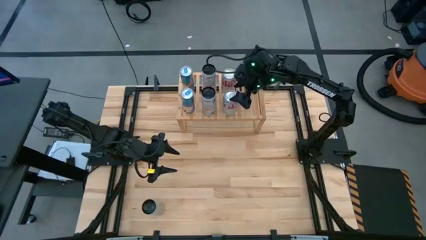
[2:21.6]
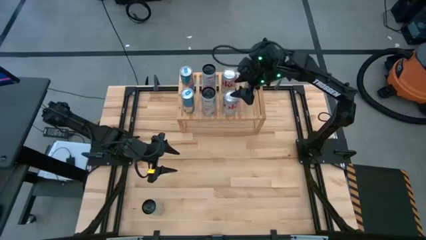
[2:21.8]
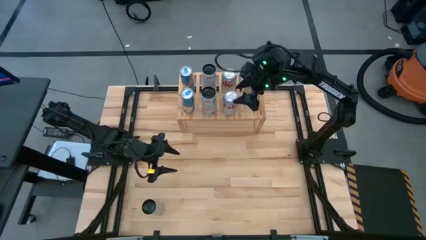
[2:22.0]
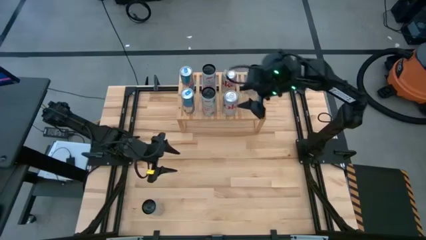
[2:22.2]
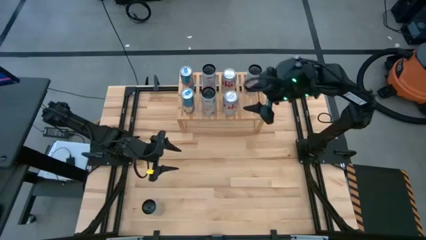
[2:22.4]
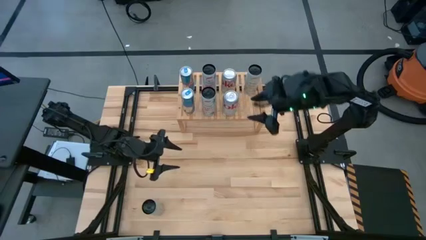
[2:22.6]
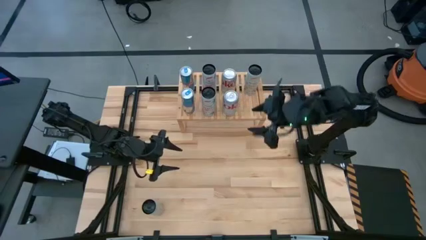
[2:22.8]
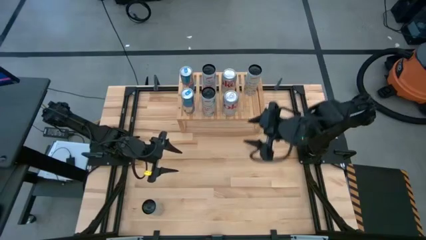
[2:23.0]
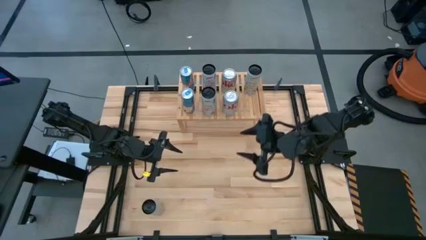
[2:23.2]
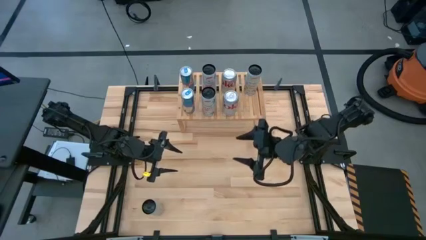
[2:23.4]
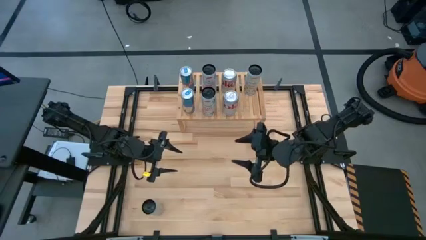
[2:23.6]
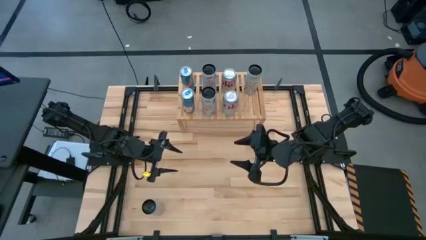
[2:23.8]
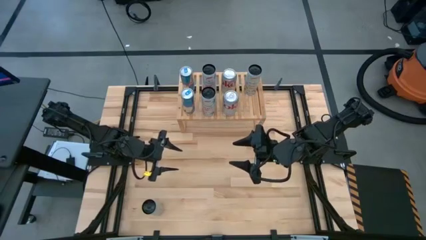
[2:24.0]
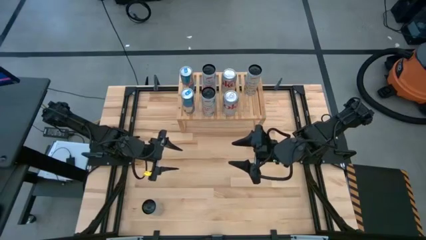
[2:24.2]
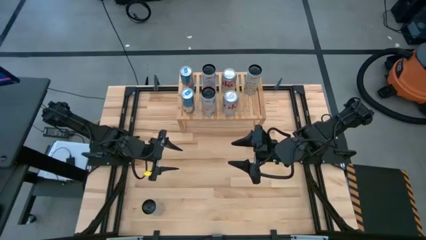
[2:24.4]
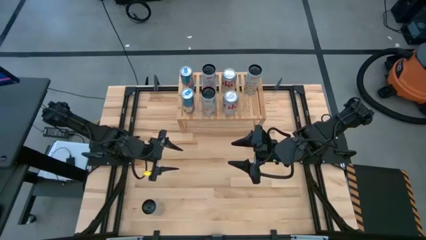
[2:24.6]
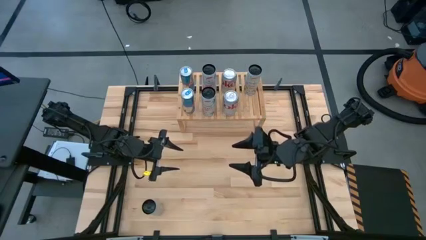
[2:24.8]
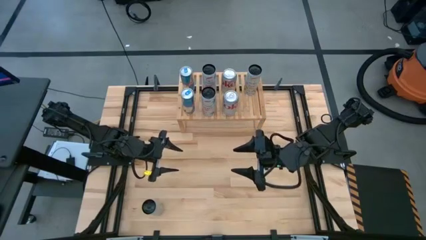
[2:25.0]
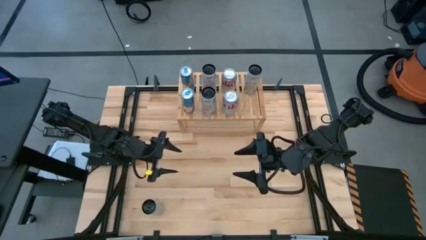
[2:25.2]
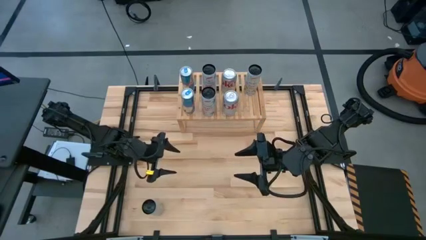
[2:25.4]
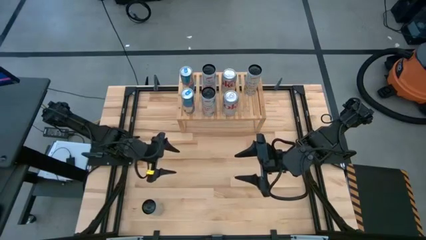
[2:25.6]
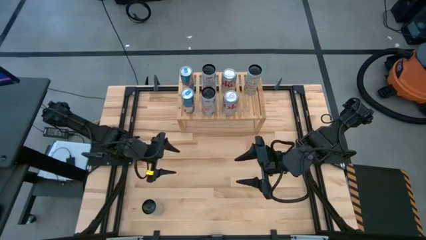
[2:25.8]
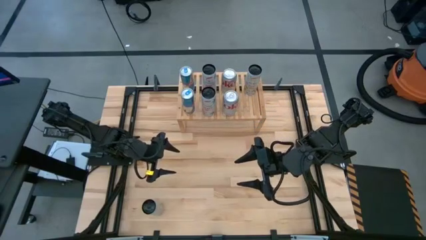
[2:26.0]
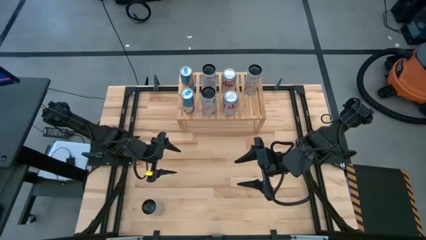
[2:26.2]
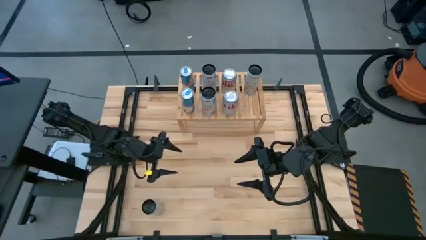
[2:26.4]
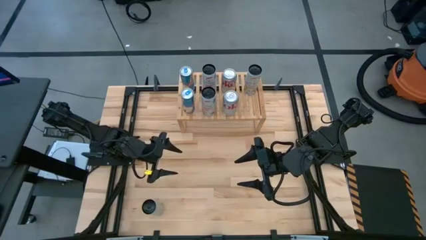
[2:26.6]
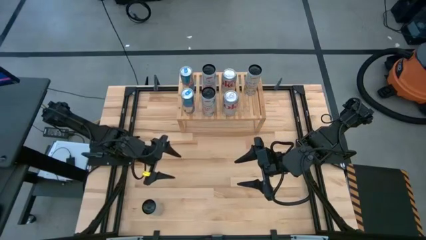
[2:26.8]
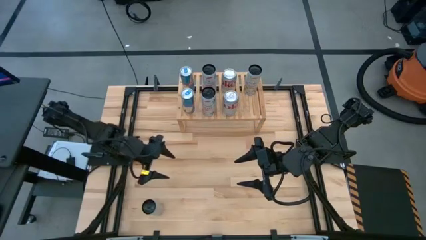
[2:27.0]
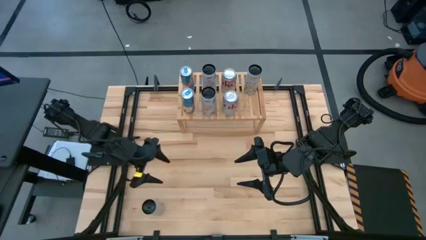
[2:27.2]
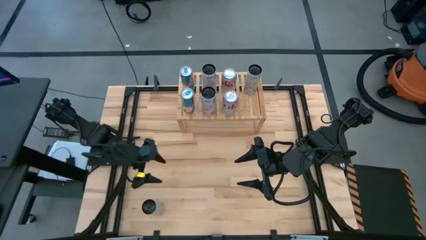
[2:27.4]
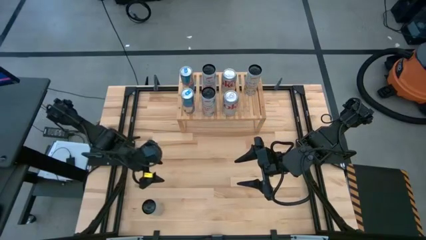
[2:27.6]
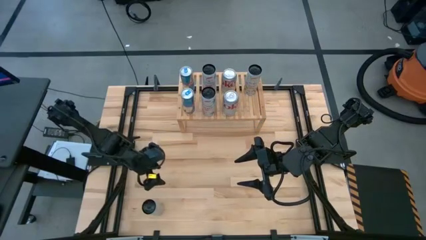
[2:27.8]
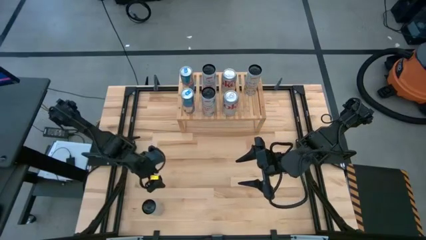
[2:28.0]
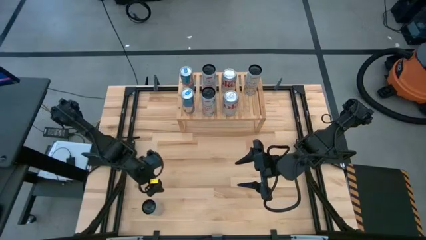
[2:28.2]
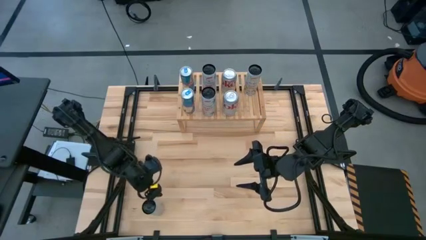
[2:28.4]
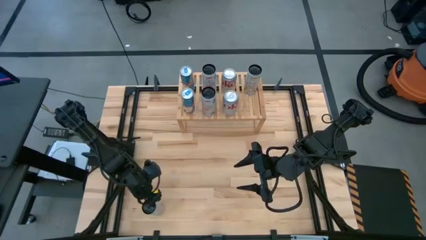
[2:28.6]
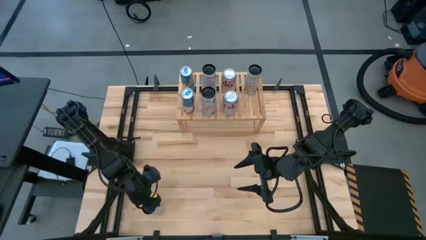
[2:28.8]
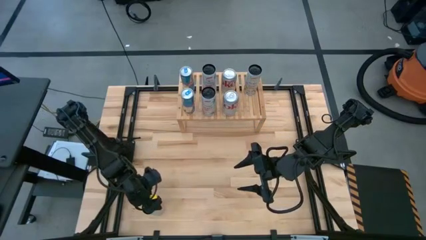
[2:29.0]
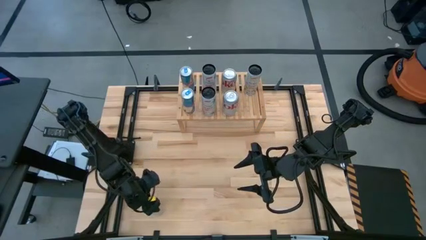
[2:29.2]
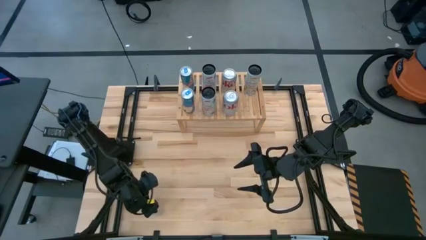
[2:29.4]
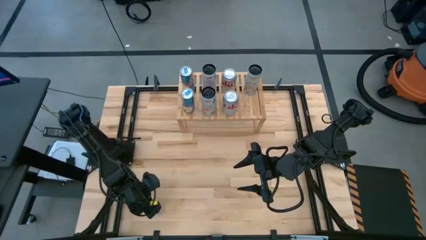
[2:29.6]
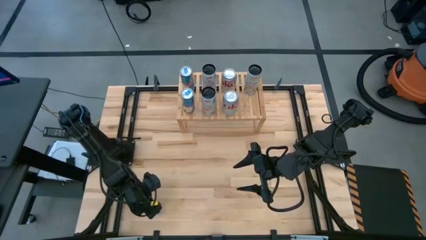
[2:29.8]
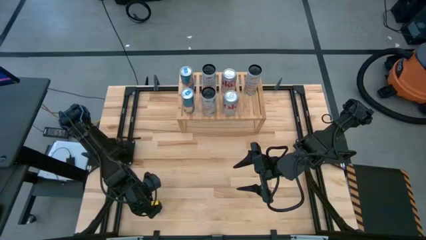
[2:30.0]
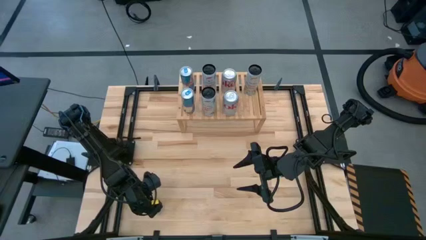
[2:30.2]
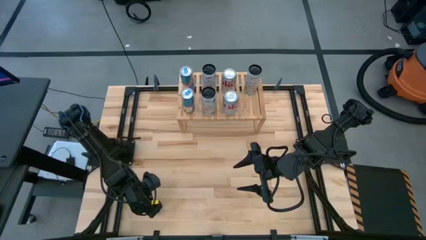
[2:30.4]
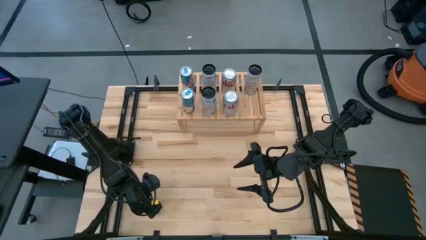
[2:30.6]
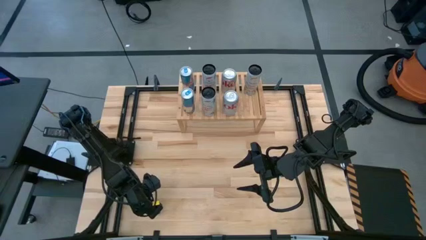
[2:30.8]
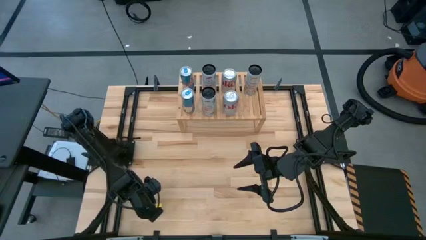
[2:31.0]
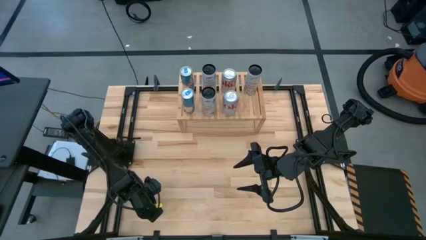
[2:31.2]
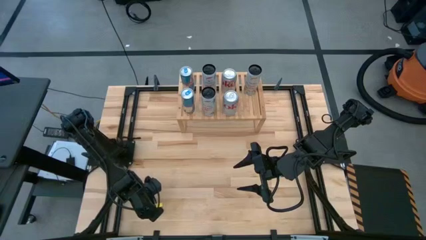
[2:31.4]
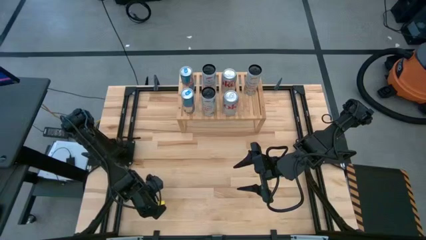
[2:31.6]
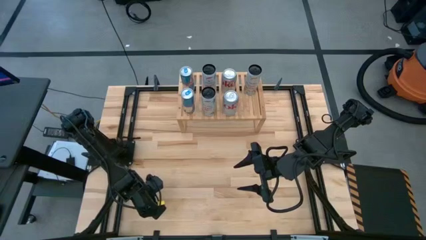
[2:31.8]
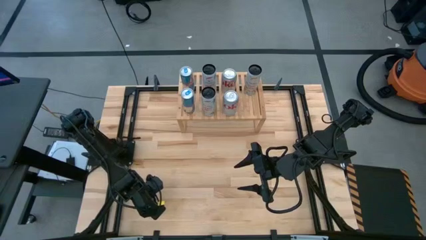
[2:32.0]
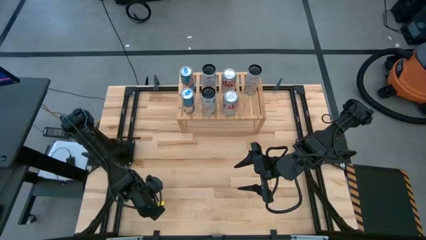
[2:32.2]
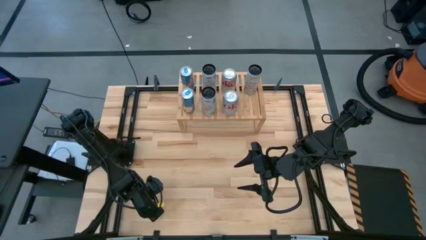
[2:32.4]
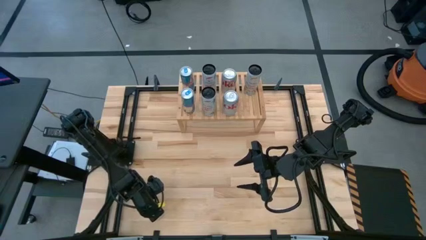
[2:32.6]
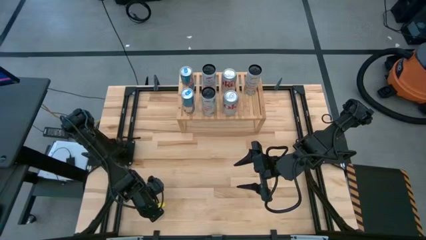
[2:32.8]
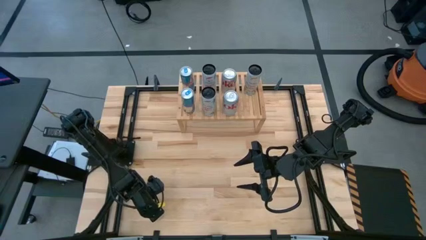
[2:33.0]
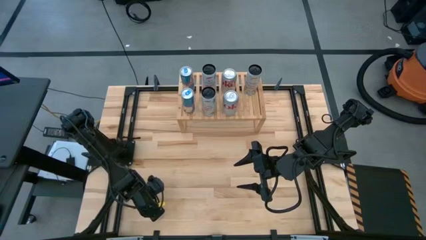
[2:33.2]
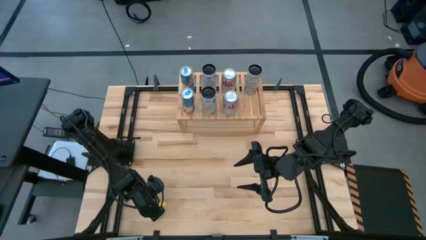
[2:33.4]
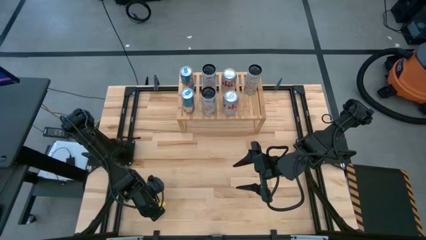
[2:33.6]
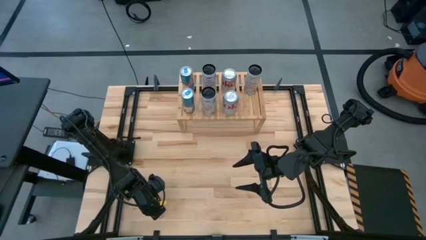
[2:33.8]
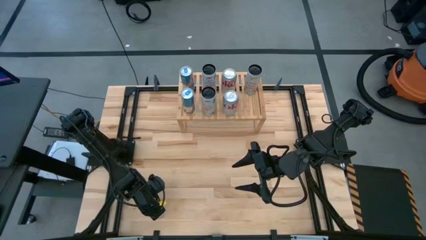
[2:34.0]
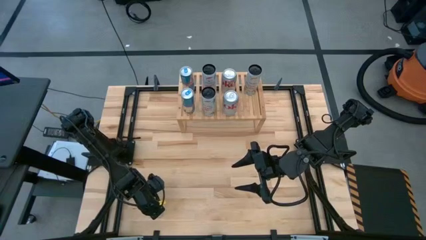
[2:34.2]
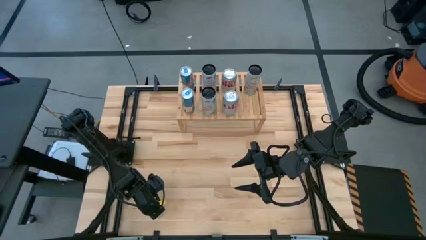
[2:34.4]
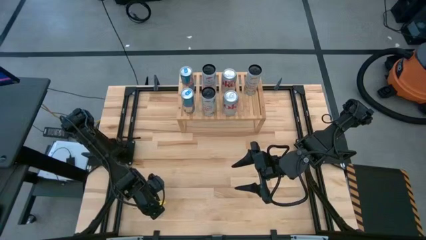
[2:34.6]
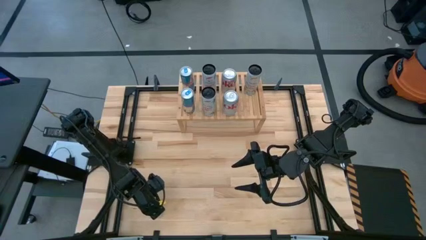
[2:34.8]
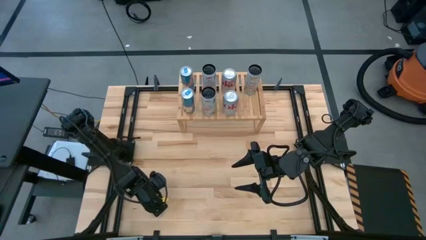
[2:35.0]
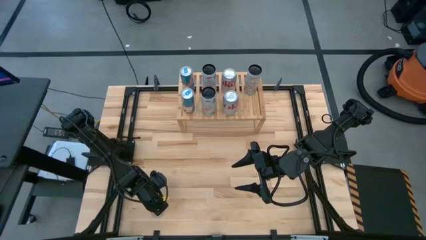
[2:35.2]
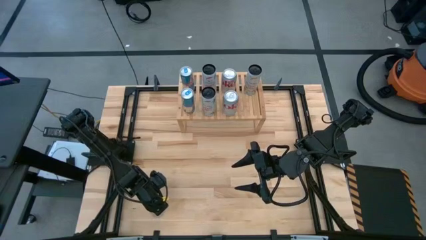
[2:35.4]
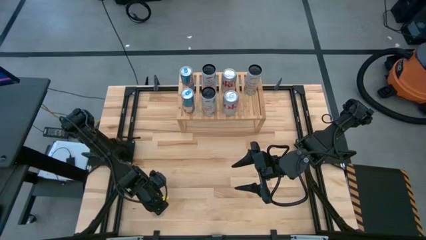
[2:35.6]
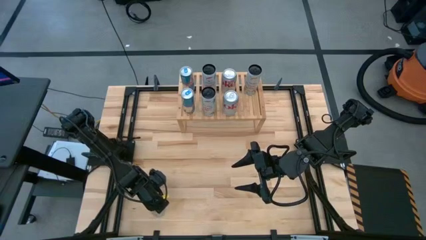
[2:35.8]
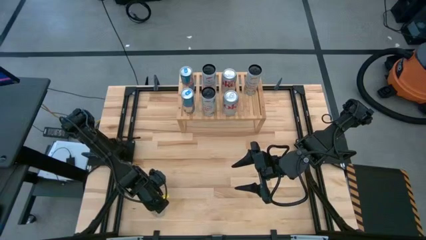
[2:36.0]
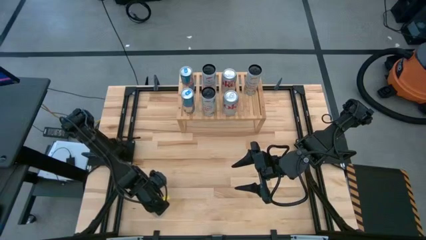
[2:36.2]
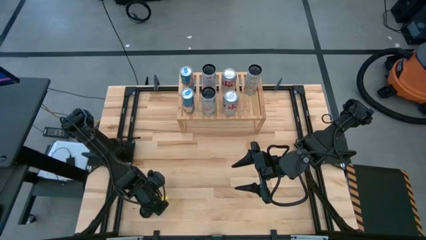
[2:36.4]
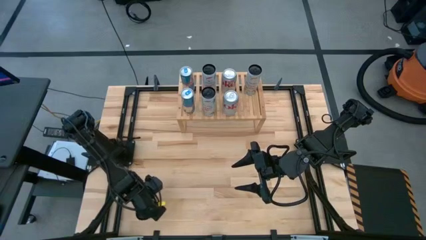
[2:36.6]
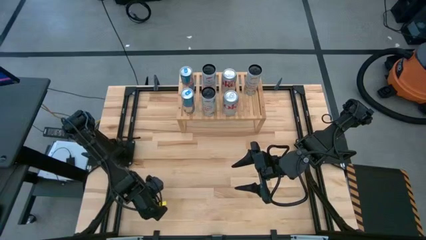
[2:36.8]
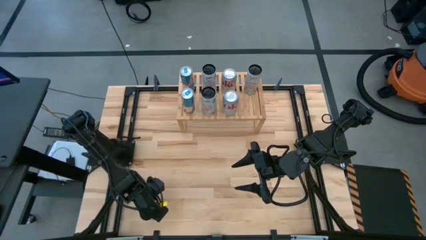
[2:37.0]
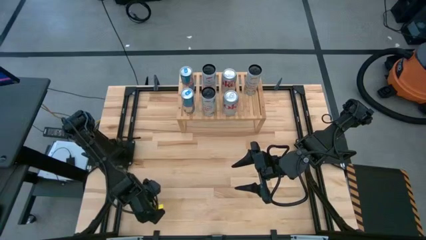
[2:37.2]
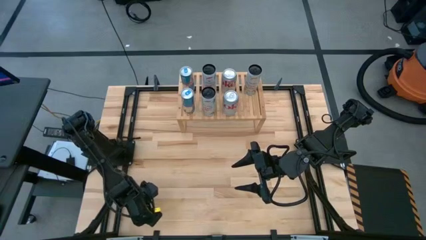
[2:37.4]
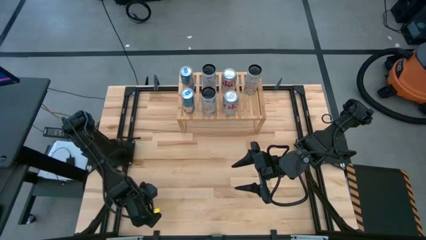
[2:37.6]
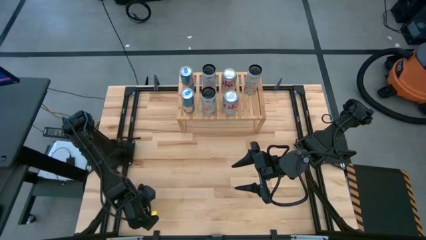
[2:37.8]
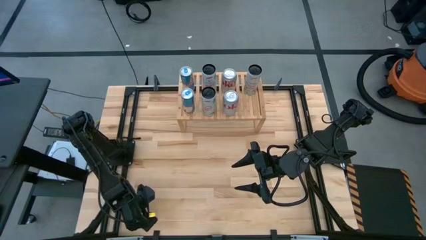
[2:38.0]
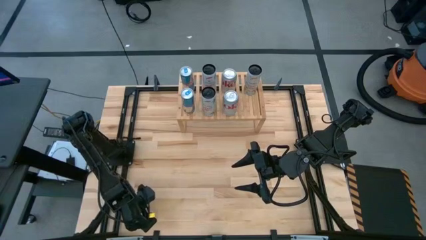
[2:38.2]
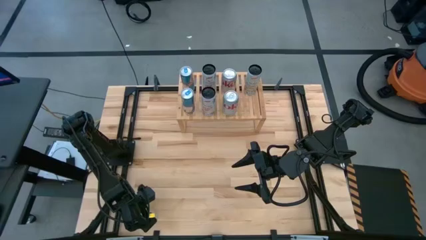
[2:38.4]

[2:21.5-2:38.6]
Task: Place canned beverage on shelf
Put the white and yellow soda can on the shelf aligned with the white and yellow soda can
